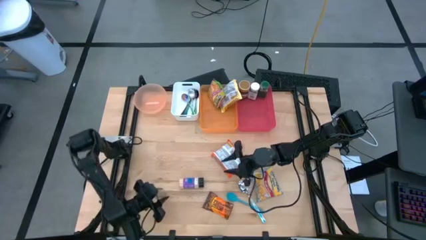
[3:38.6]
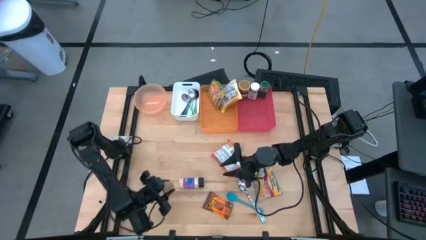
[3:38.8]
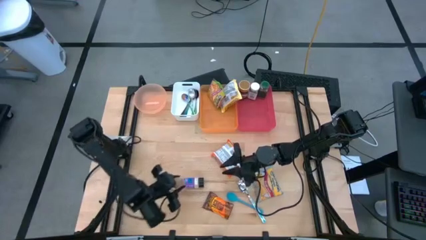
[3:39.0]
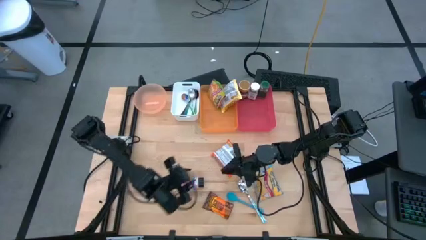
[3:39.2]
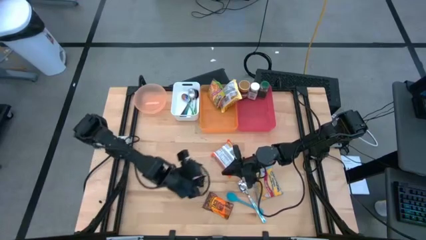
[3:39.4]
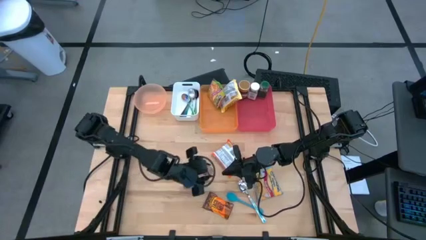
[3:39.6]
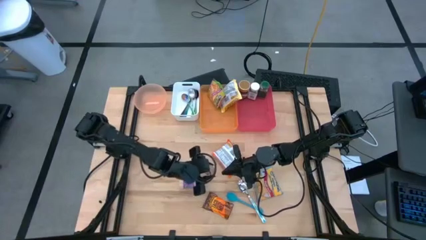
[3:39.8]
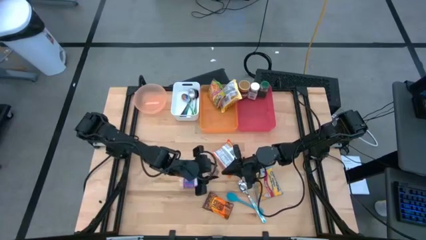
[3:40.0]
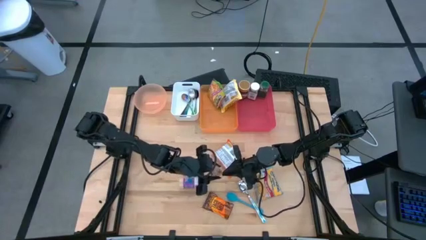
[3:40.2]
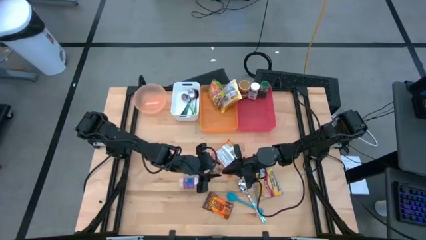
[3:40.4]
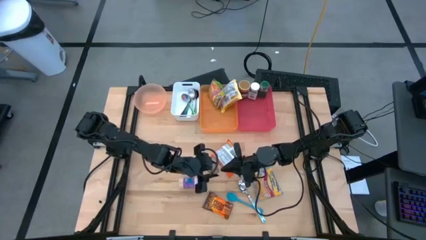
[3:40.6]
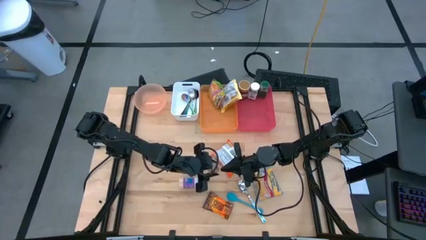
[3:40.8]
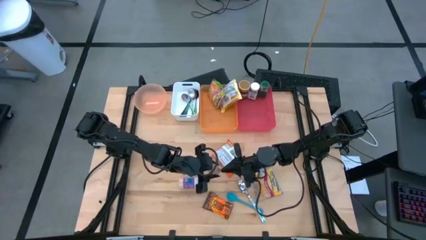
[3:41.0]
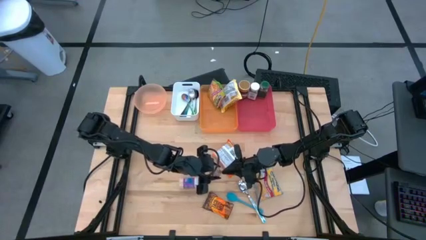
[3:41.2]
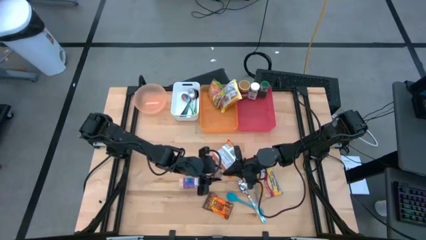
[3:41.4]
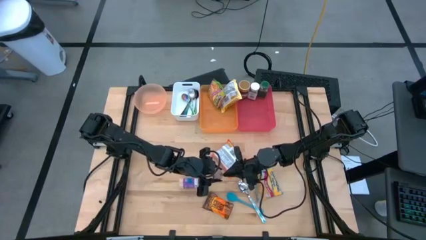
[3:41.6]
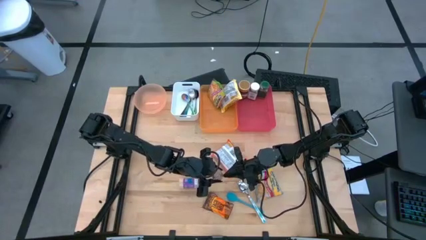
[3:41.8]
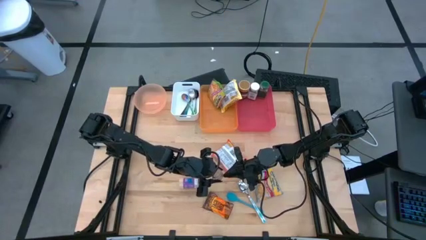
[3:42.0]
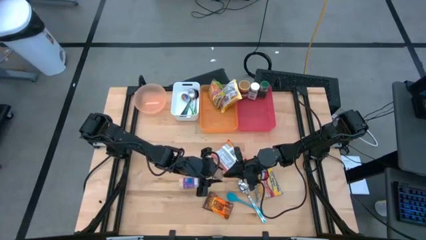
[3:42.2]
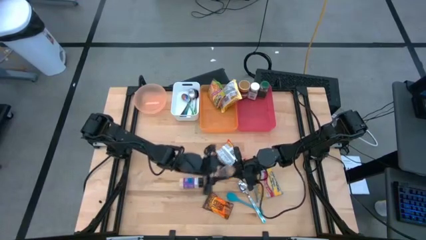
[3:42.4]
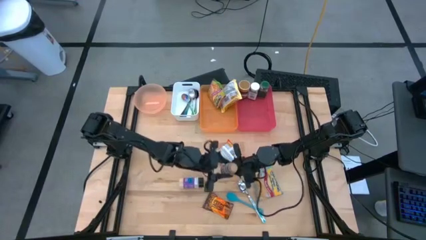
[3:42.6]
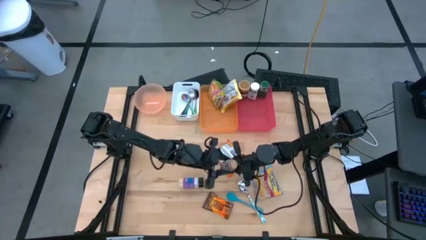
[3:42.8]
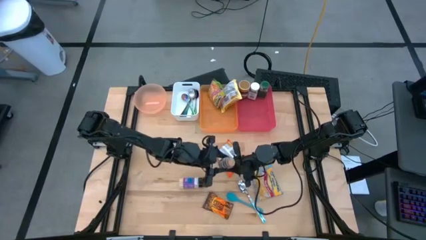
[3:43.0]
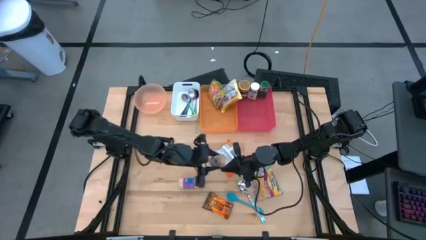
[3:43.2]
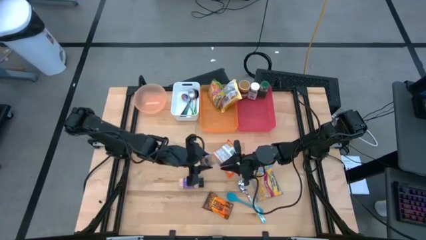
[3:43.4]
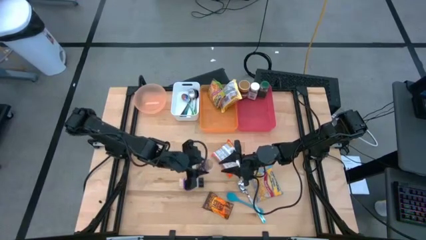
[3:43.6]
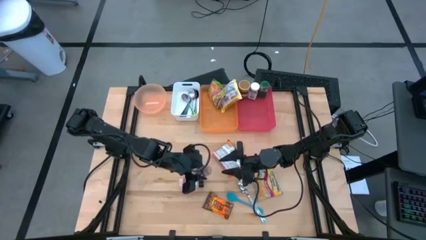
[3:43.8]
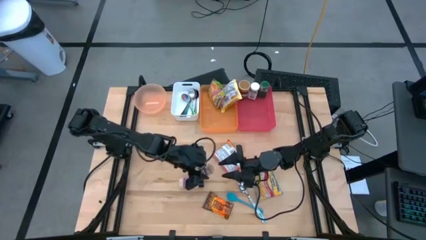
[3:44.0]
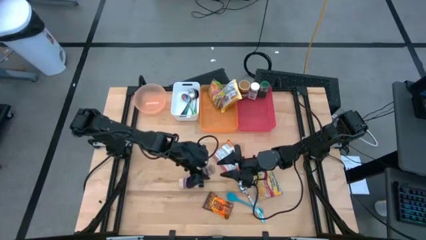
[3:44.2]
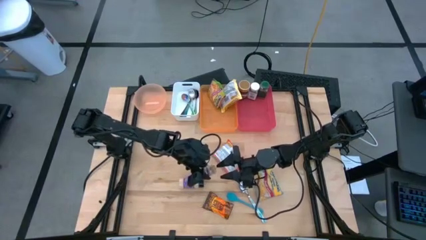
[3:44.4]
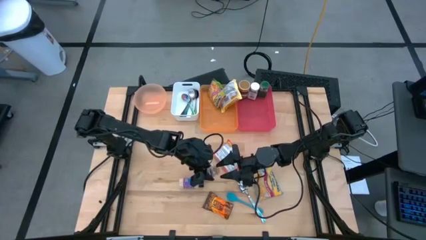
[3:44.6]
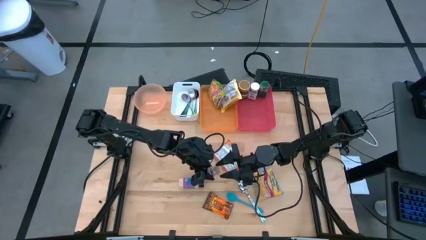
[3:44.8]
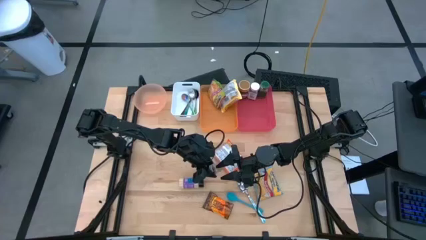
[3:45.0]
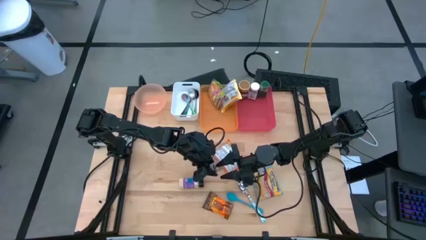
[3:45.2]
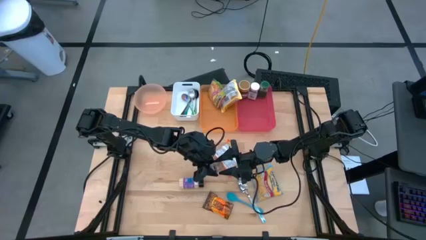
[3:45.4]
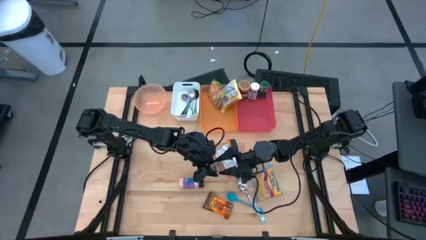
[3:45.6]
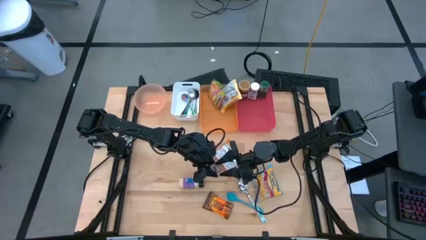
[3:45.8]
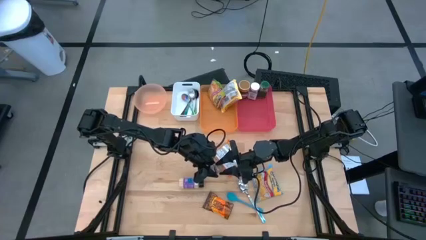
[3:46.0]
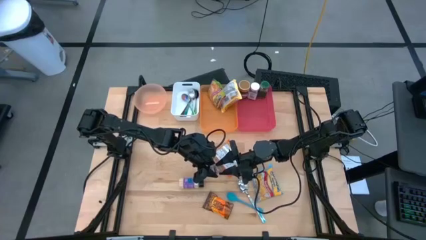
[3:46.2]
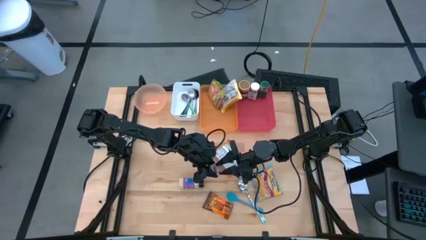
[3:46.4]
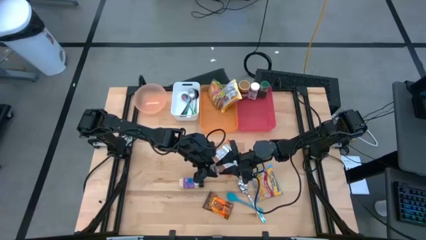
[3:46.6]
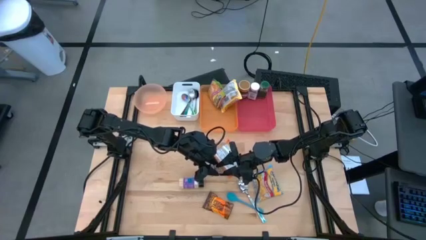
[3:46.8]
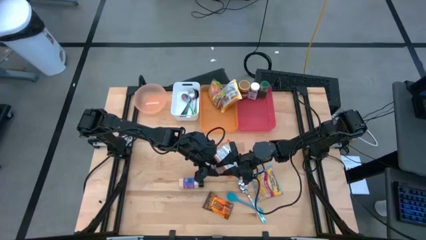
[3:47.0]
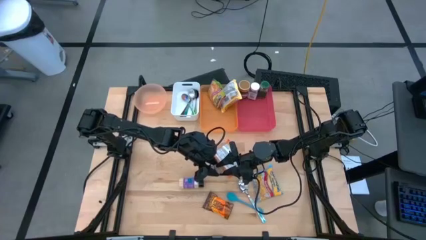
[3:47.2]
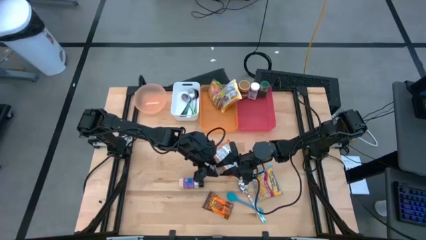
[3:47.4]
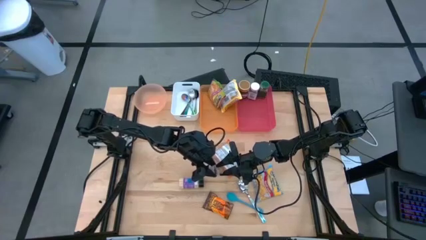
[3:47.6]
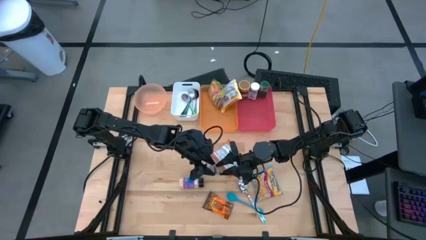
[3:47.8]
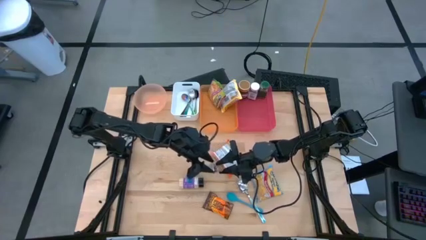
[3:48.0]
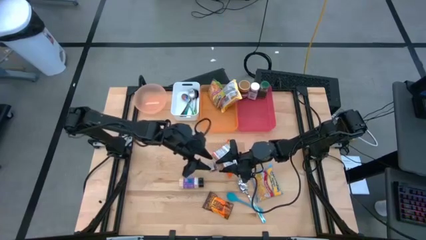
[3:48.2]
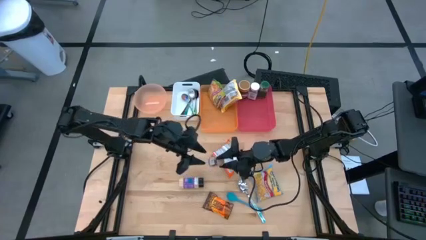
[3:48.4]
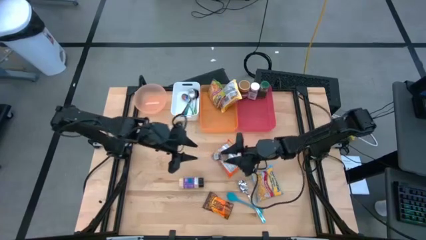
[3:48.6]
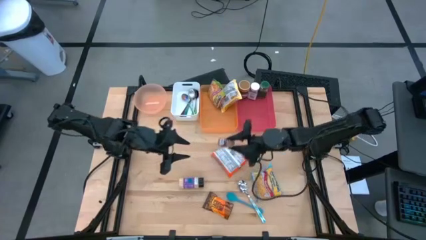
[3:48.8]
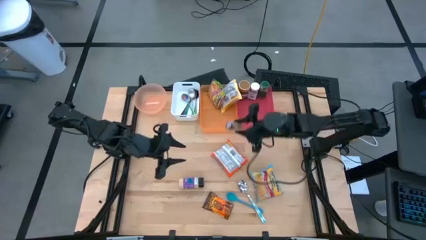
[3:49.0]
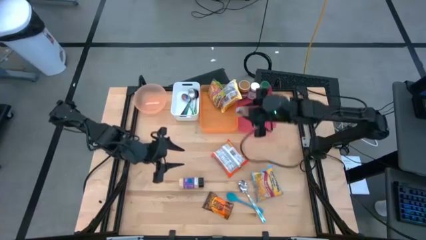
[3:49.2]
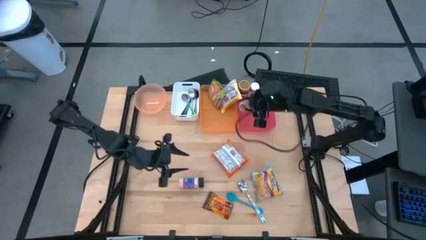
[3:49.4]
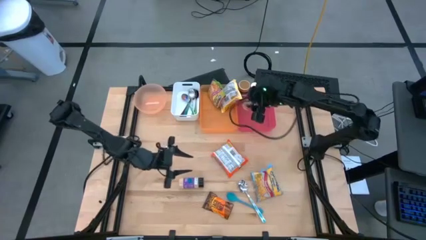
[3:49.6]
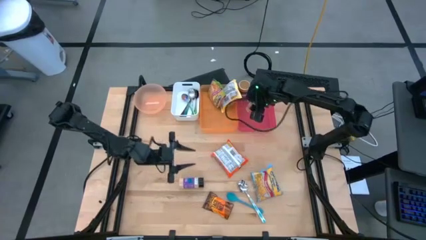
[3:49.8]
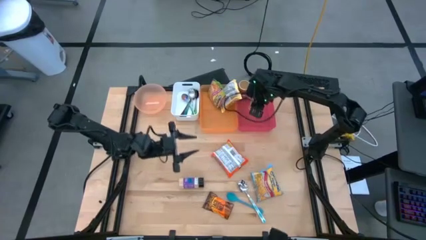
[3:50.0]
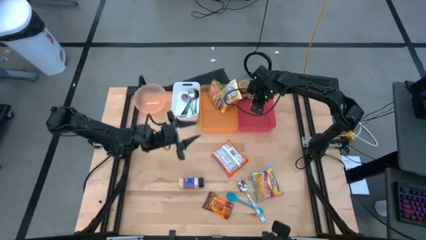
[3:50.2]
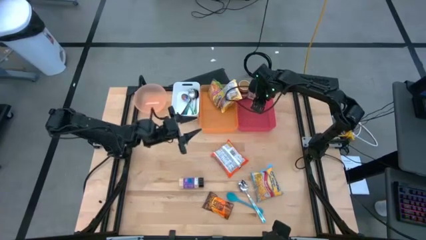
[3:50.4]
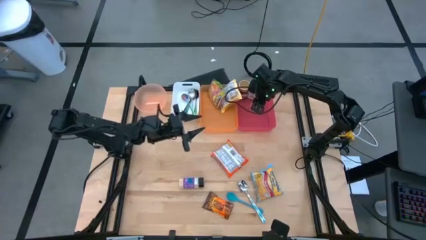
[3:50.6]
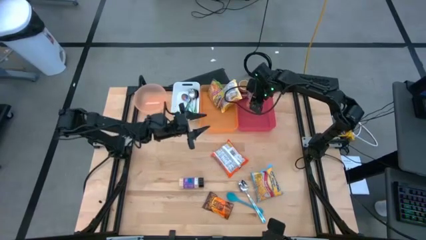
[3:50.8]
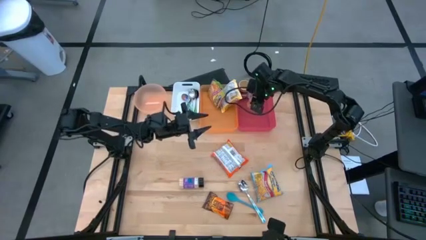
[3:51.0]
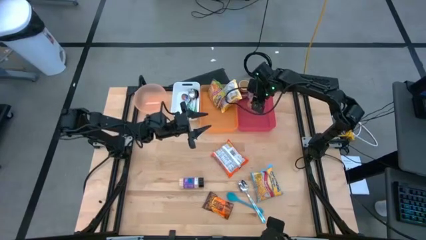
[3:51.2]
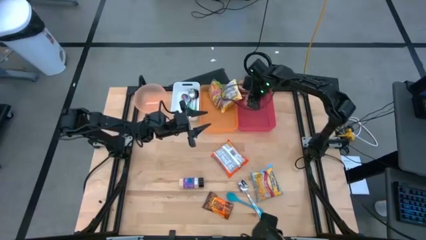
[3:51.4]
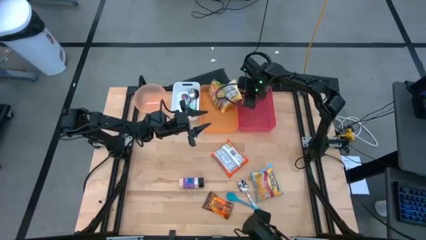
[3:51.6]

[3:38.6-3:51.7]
Task: Pick & Place Food Item
Put the brown seasoning bottle into the red bin

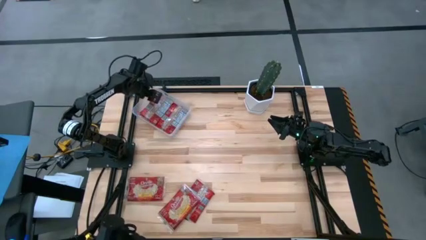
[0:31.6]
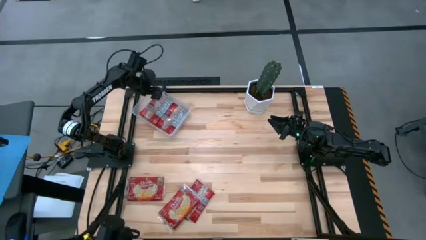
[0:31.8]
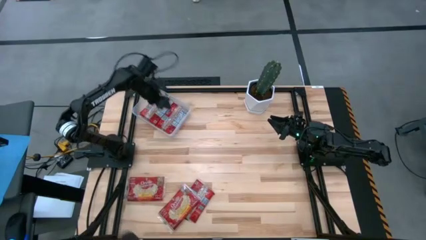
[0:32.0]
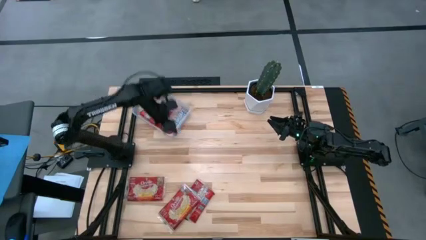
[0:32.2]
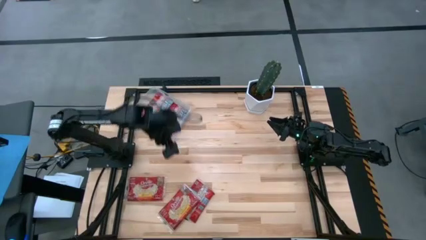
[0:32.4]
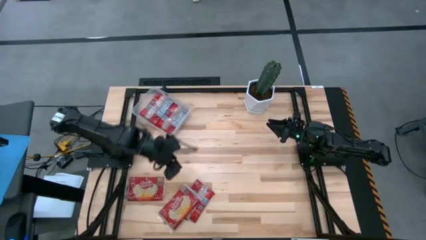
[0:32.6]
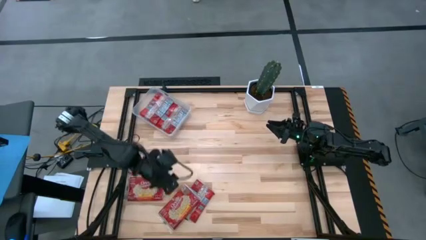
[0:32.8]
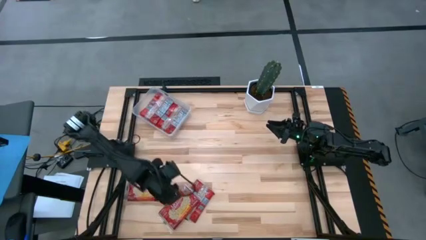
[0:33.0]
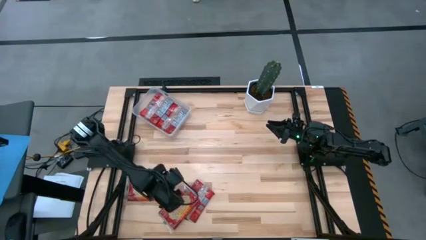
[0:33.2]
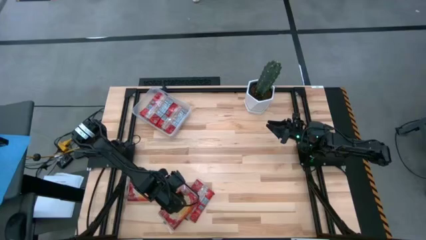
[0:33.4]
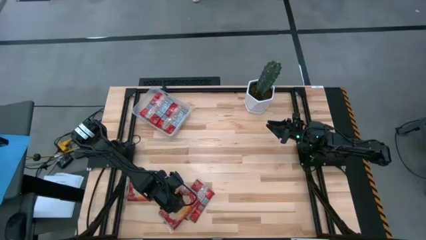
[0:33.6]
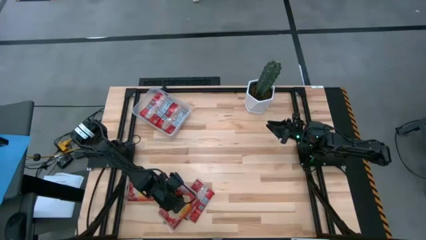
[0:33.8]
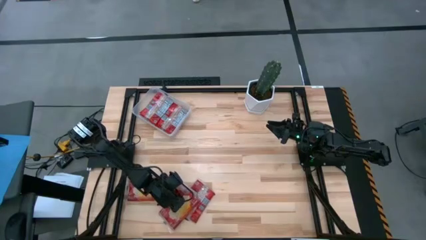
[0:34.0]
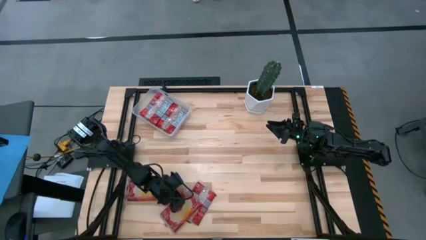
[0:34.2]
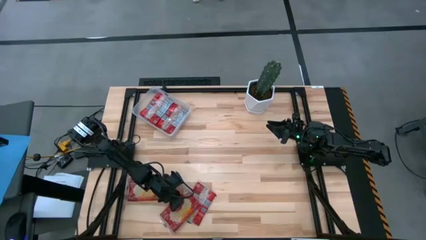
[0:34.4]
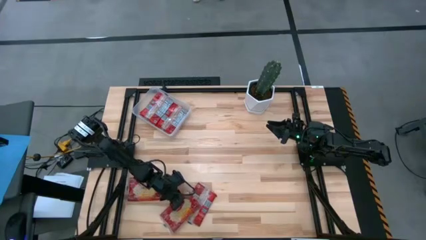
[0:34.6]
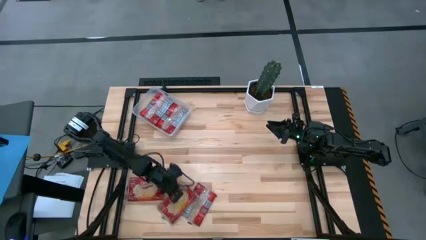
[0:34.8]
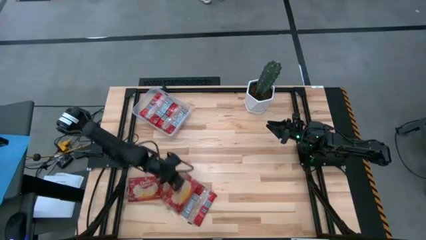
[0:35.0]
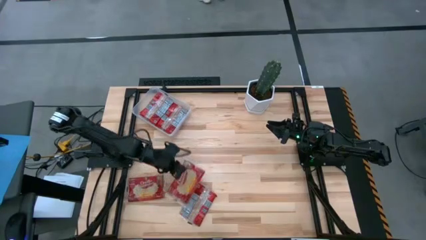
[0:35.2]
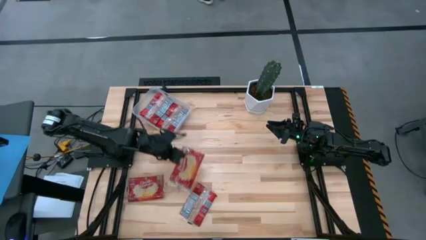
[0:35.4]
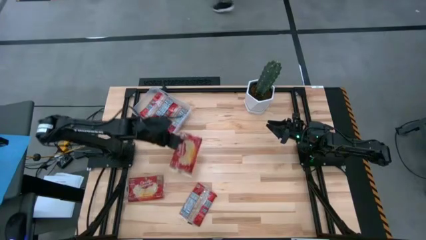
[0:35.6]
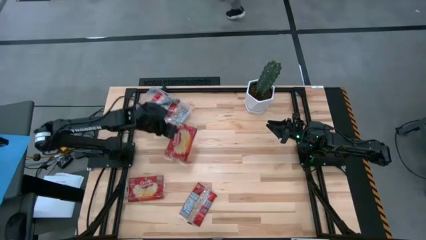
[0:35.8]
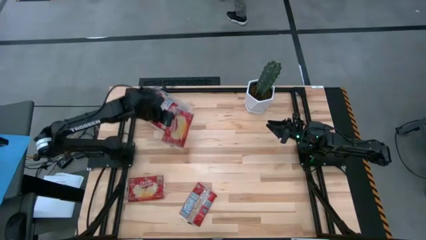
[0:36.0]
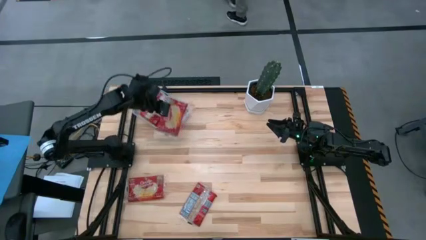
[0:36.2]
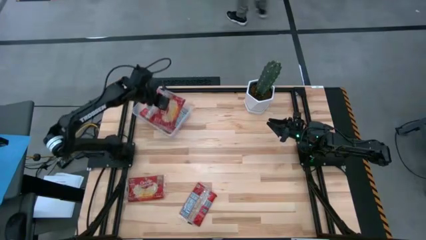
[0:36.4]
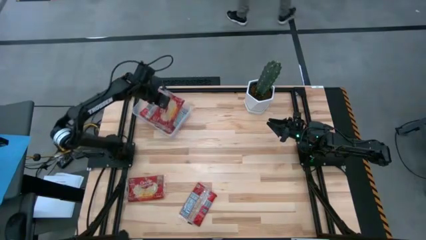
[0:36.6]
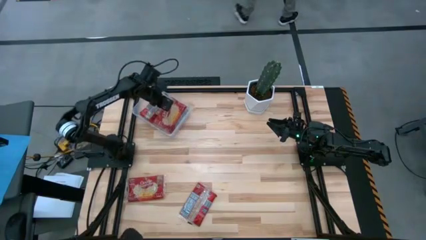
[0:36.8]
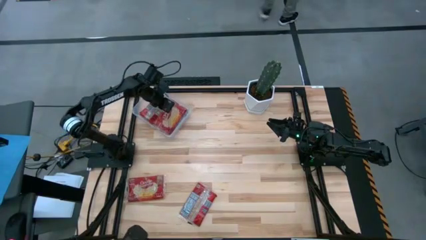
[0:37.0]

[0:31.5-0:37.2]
Task: Sort popcorn bags into baskets
Put the red popcorn bag into the transparent bin
